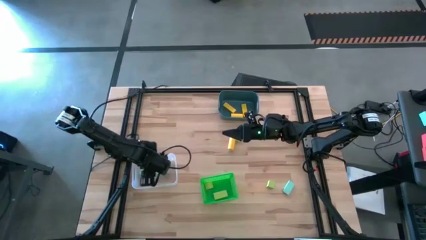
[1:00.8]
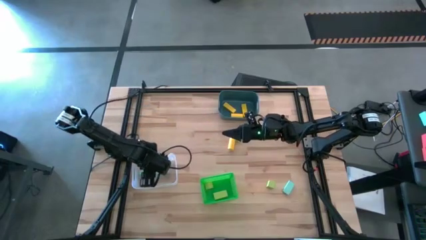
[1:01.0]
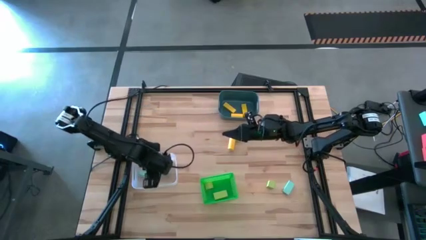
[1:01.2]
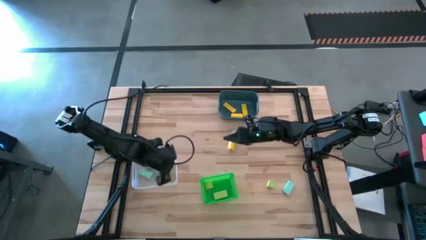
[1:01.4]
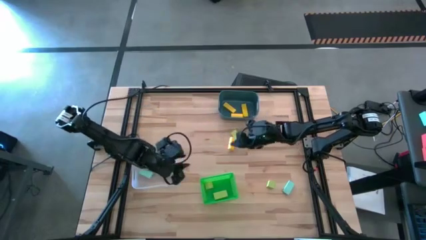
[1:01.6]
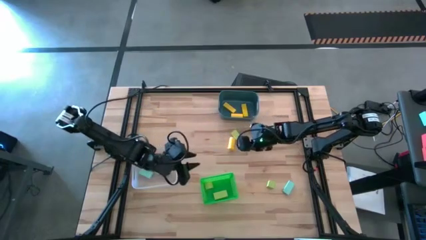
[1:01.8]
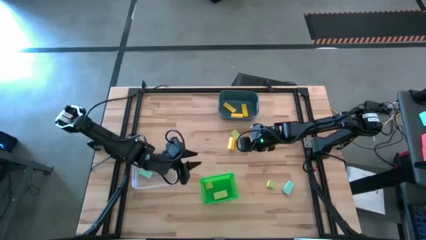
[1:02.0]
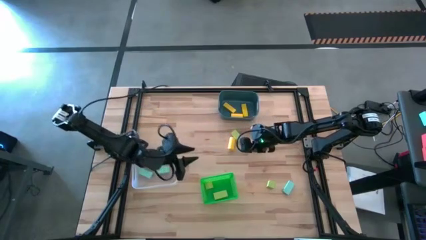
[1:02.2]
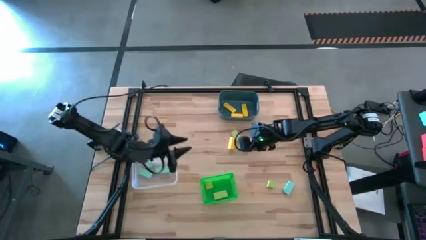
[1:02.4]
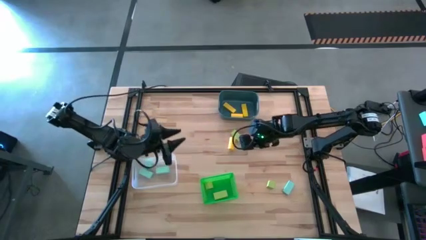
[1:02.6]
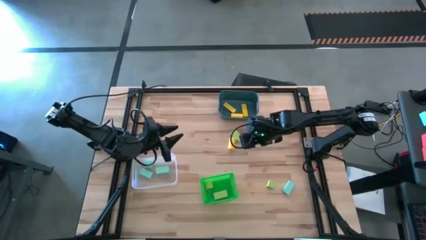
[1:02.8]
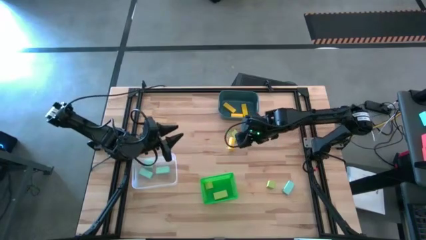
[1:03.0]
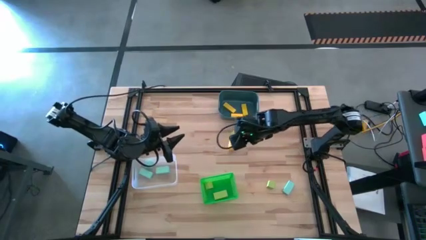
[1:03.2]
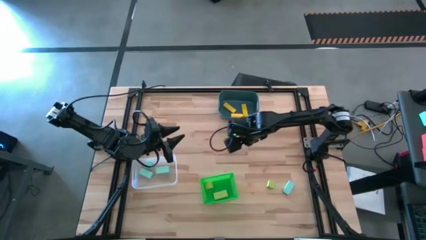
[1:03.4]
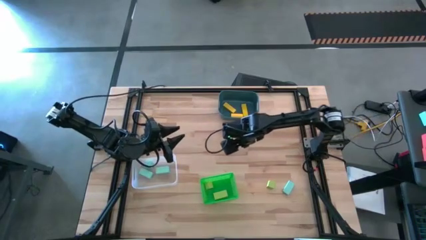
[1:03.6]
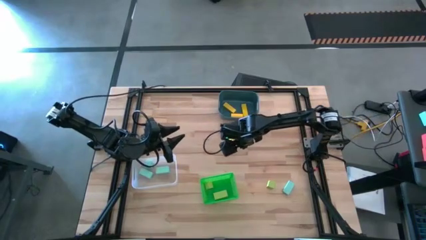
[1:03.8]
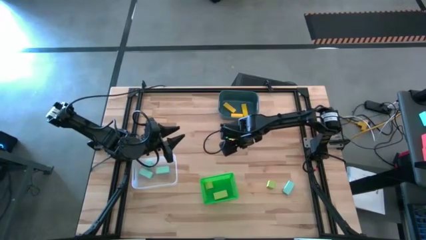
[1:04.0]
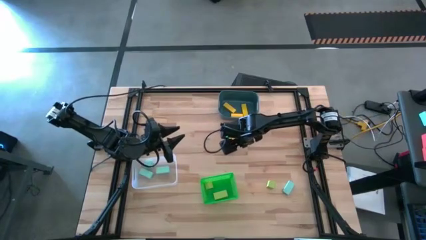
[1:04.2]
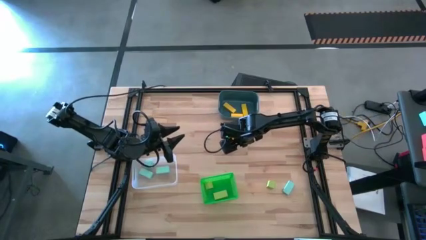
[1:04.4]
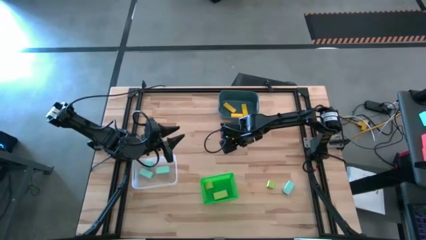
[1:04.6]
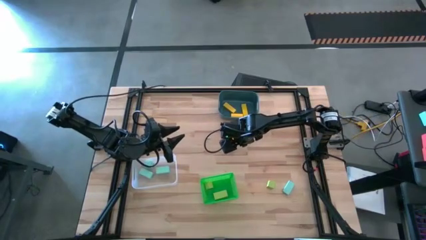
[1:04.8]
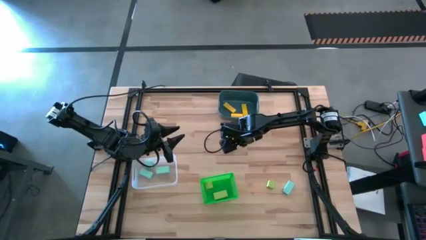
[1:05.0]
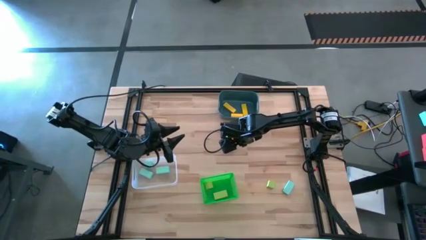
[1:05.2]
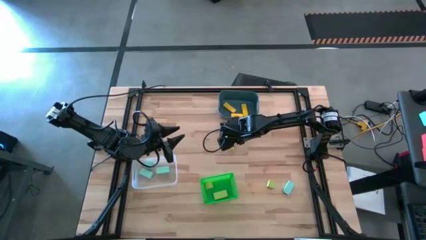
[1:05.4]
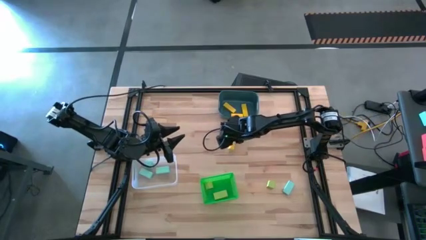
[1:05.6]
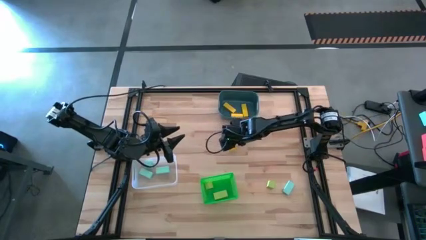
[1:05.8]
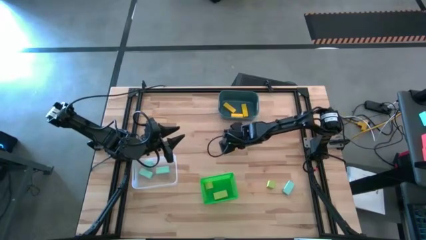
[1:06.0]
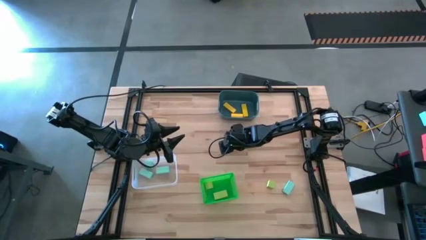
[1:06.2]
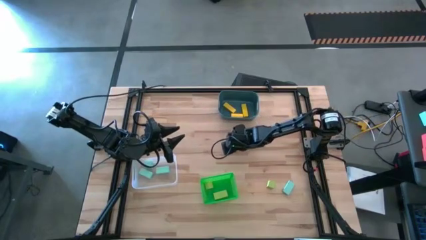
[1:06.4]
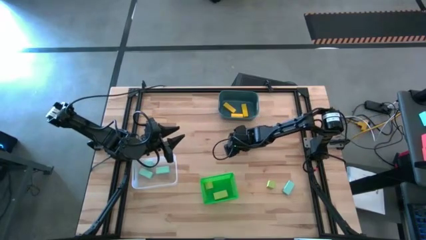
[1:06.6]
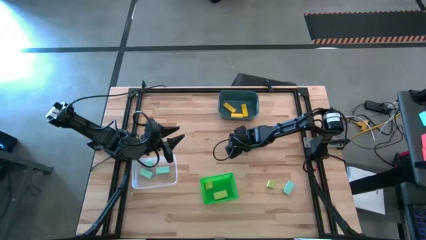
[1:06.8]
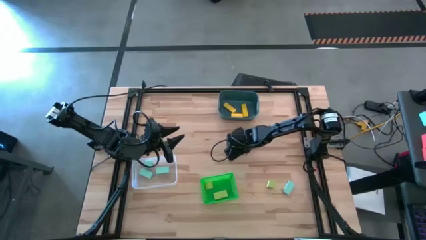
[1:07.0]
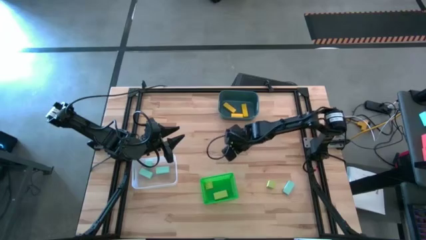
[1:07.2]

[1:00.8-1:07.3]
Task: Sort & place blocks by color
Put the yellow block into the blue bin

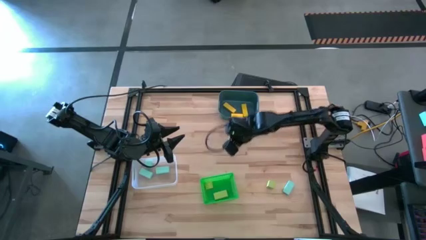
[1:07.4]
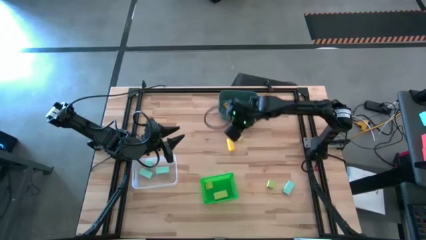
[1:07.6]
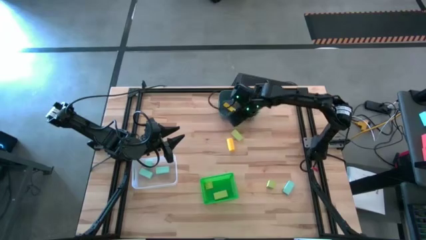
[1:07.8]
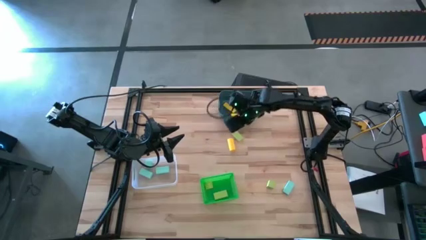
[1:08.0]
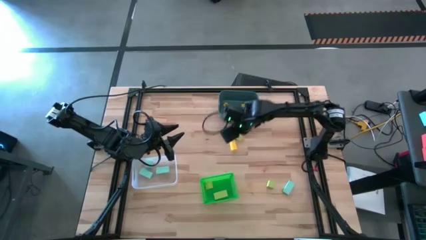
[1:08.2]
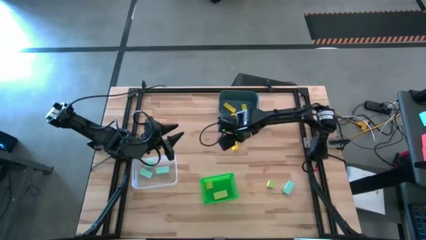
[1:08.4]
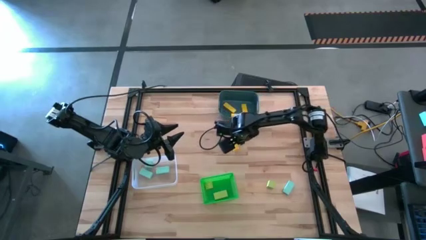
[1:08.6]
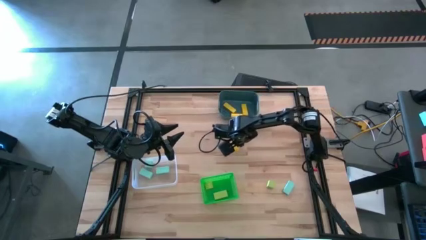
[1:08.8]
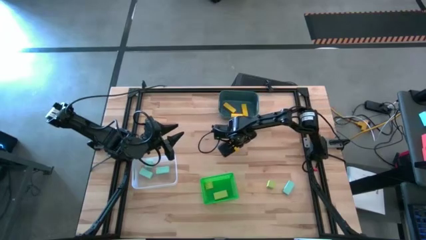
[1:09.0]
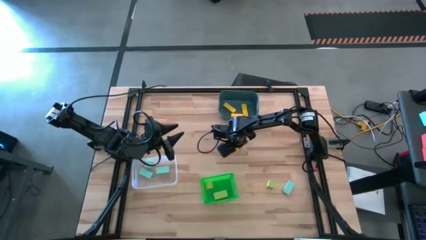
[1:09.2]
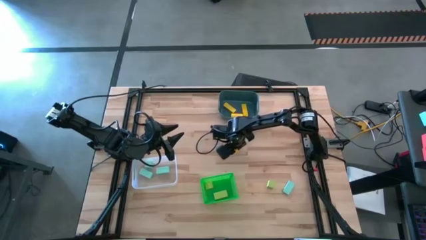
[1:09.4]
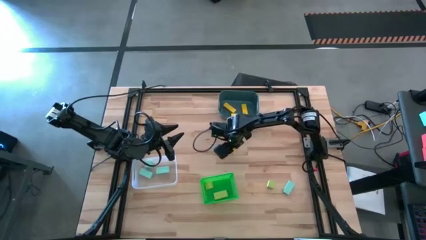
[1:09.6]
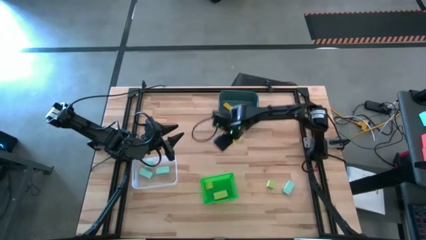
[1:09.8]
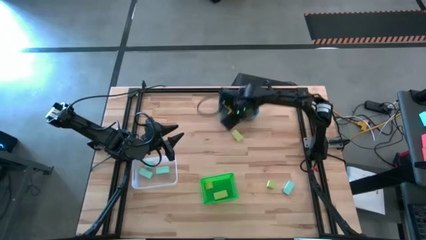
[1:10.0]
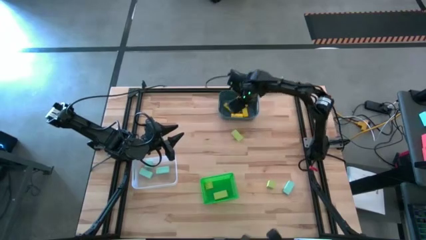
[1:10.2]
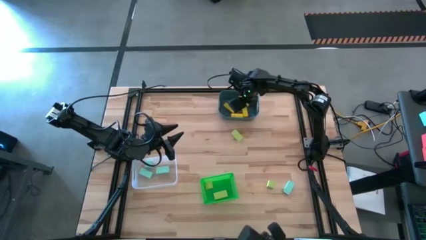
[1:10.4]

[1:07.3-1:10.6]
Put the yellow block into the blue bin

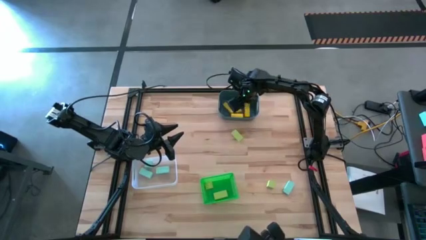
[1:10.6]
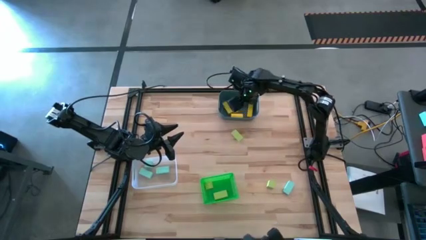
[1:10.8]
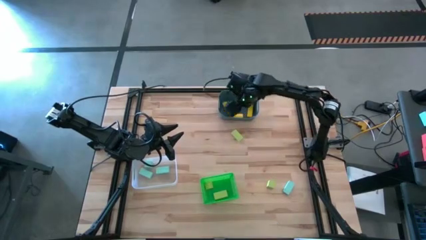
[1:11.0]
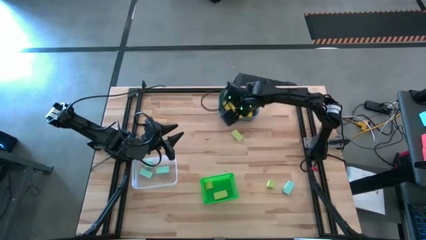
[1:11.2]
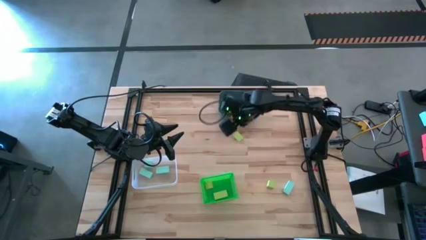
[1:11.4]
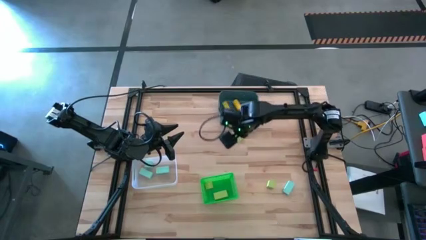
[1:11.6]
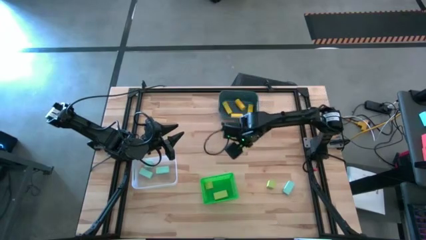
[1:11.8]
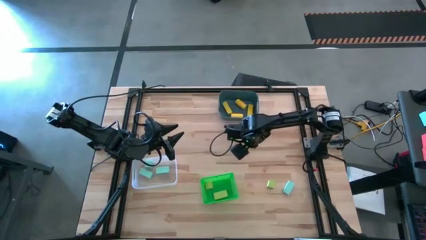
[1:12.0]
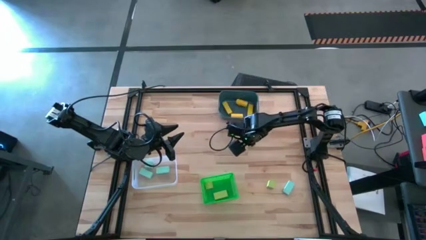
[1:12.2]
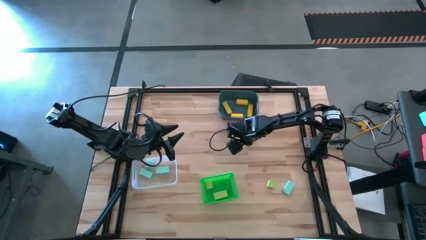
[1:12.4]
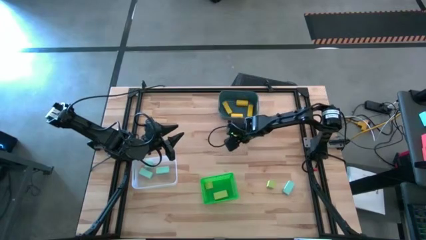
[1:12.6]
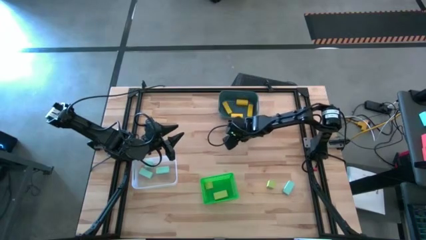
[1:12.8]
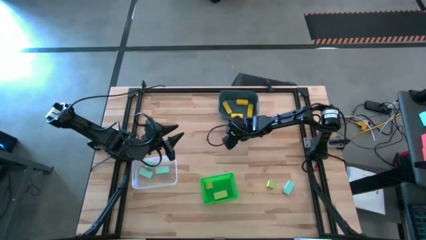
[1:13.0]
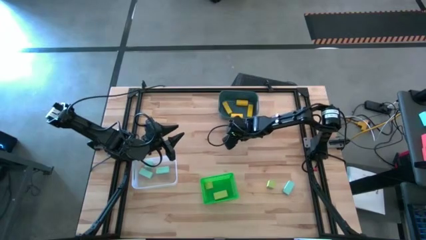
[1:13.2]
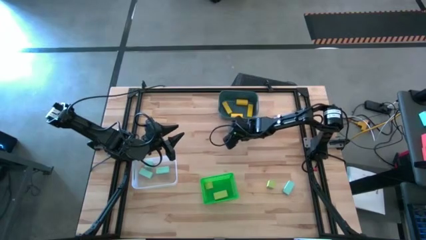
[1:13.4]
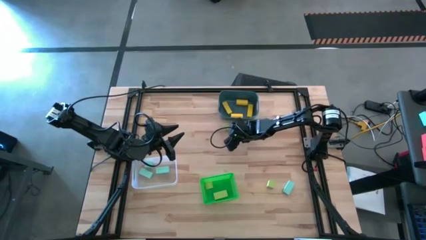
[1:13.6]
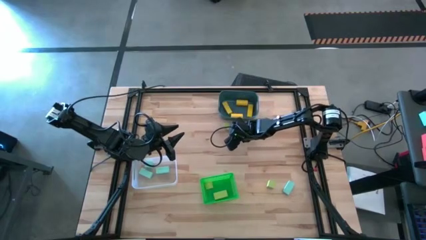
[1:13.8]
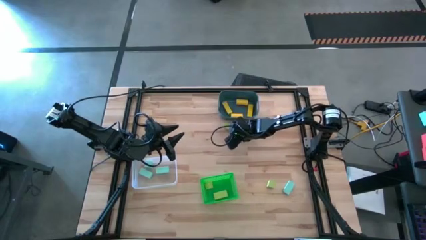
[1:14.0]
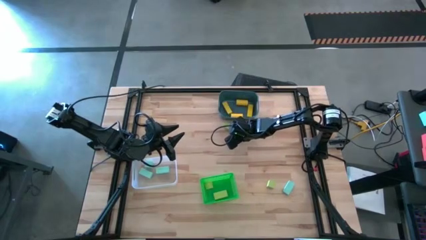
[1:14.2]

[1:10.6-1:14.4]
Put the green block into the green bin

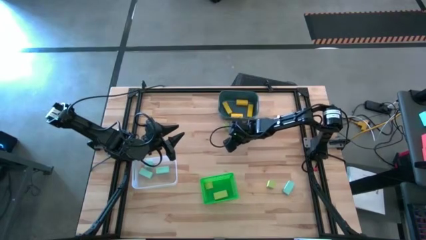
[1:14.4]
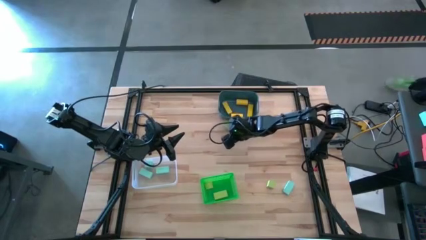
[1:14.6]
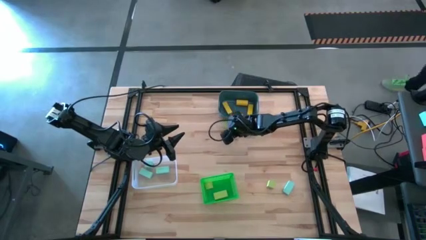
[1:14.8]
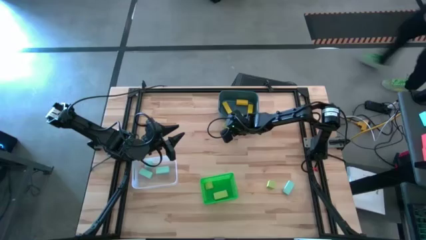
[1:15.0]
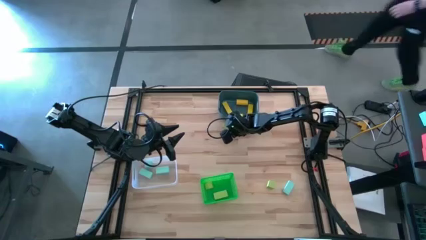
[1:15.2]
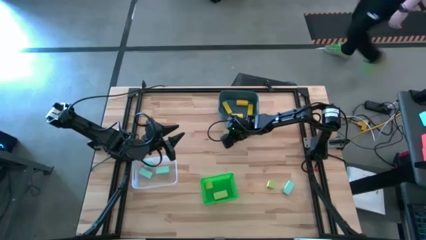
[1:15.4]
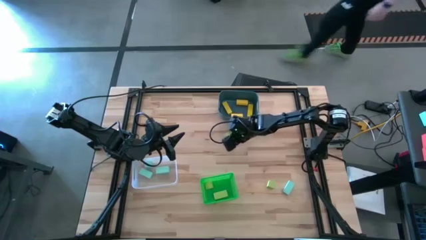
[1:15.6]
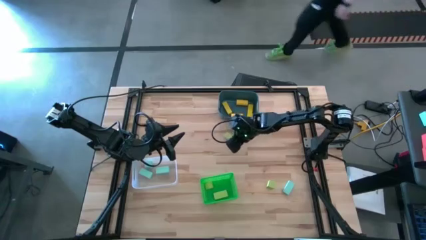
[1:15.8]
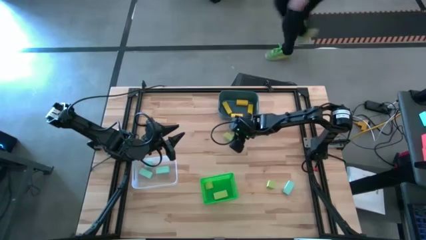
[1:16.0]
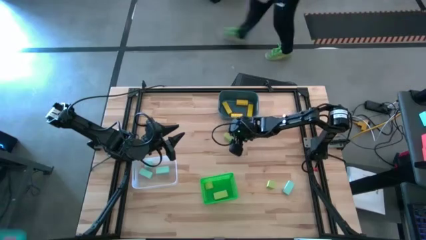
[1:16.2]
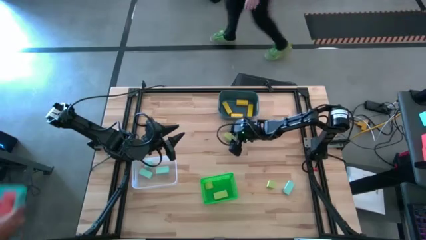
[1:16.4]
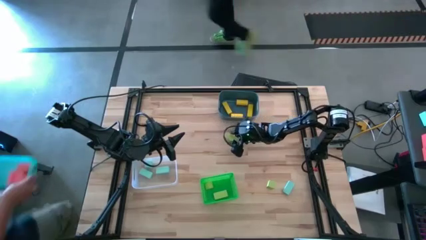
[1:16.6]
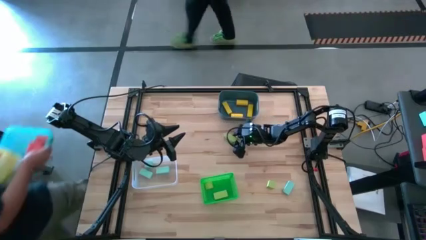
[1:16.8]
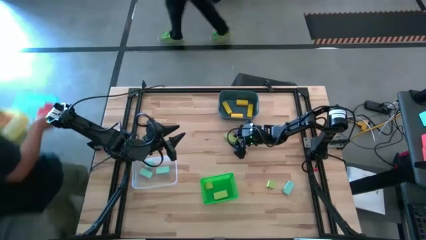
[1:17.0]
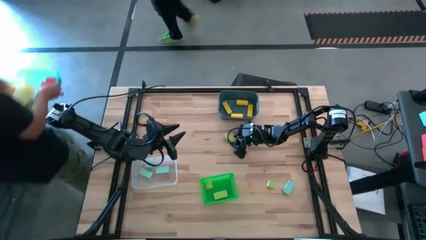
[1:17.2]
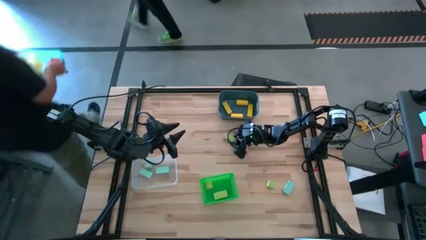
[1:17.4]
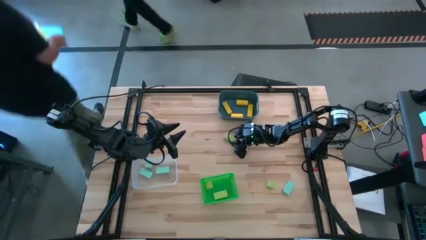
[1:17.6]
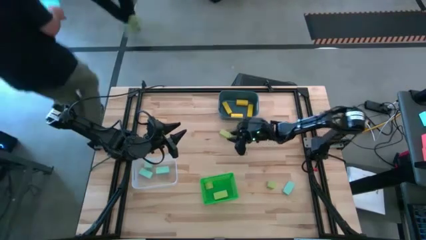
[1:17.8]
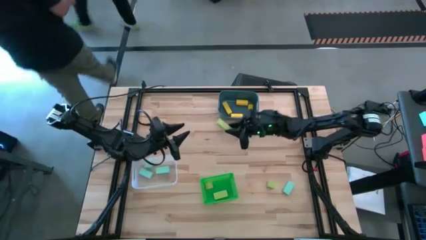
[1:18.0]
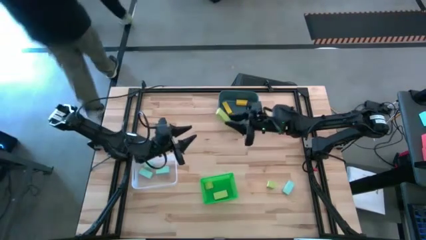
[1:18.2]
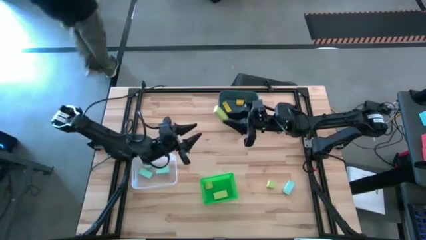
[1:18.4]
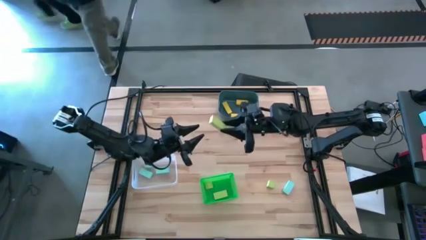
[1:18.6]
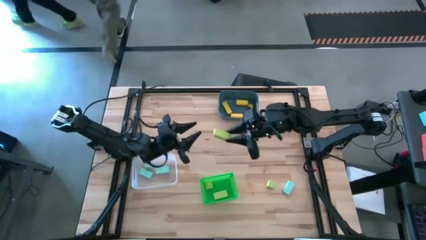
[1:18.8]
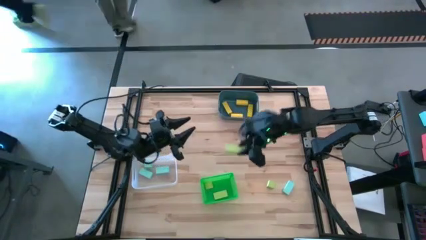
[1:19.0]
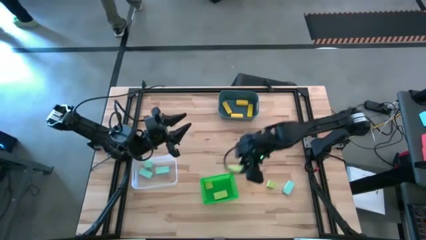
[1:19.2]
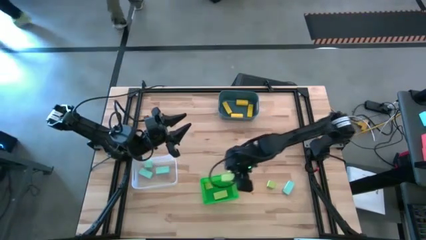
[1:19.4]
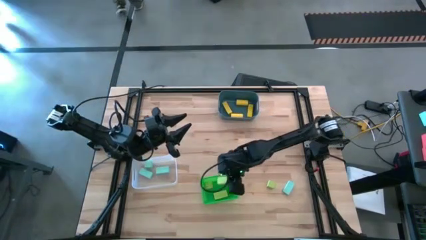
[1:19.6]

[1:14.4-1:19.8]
Put the green block into the green bin
